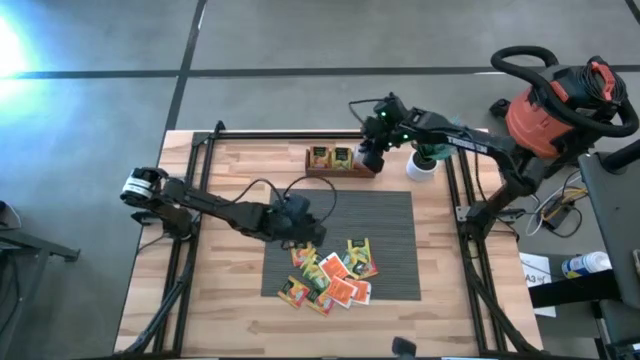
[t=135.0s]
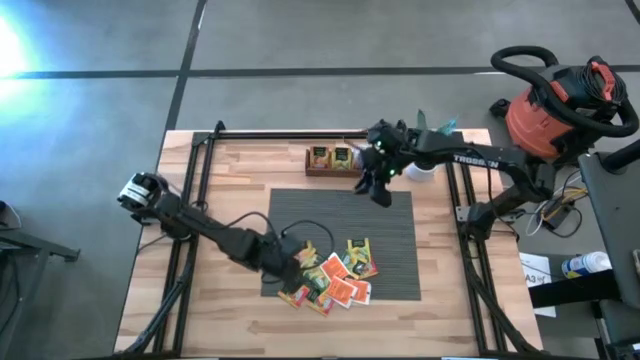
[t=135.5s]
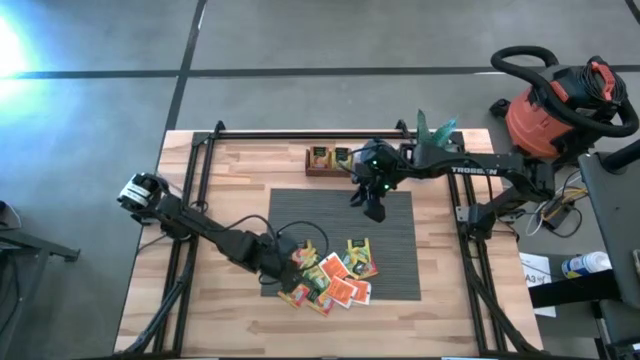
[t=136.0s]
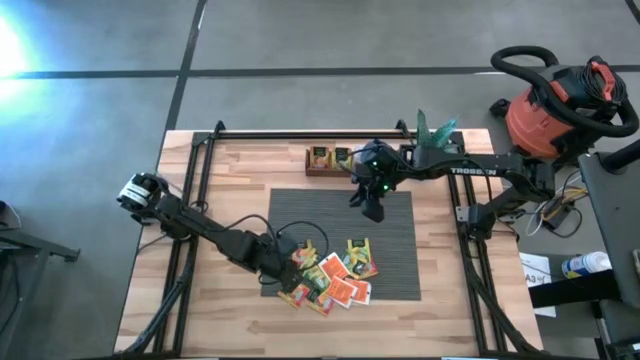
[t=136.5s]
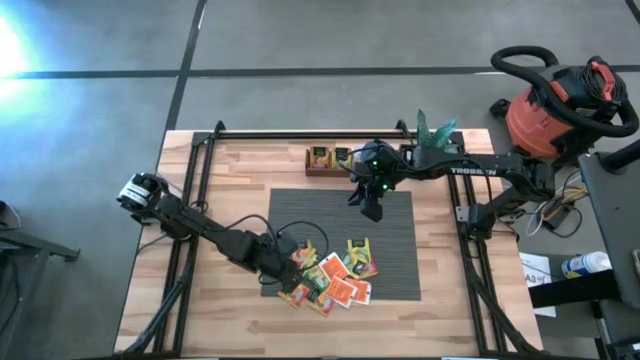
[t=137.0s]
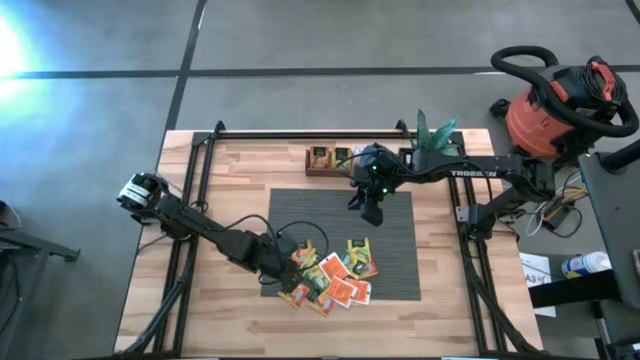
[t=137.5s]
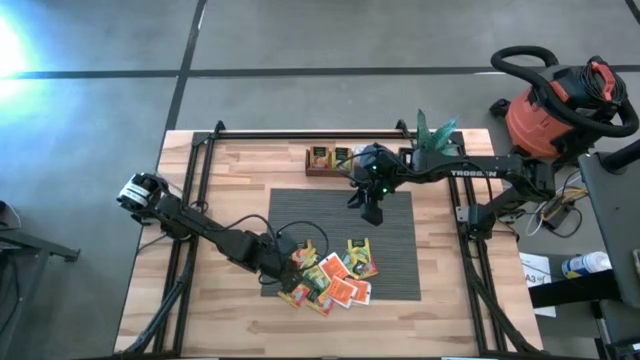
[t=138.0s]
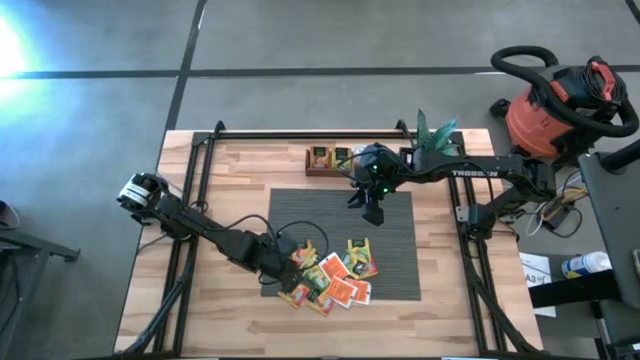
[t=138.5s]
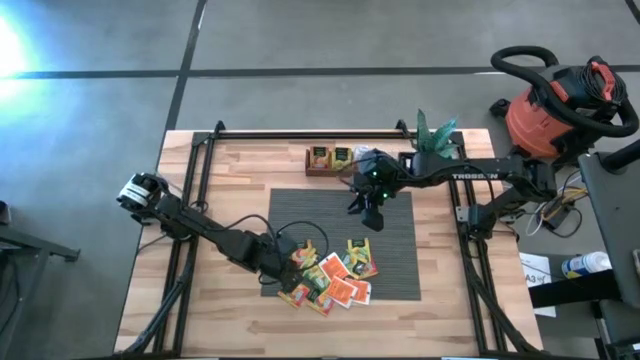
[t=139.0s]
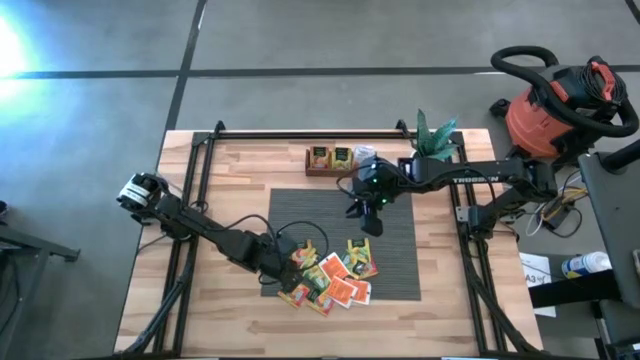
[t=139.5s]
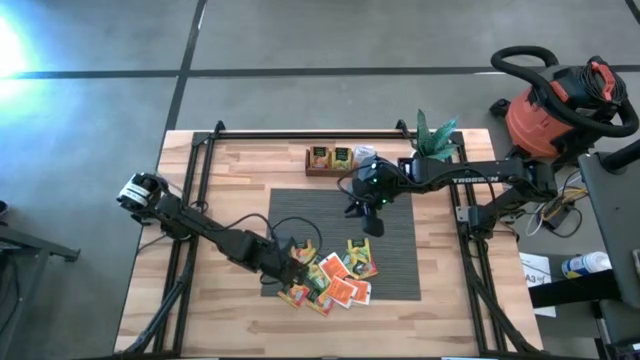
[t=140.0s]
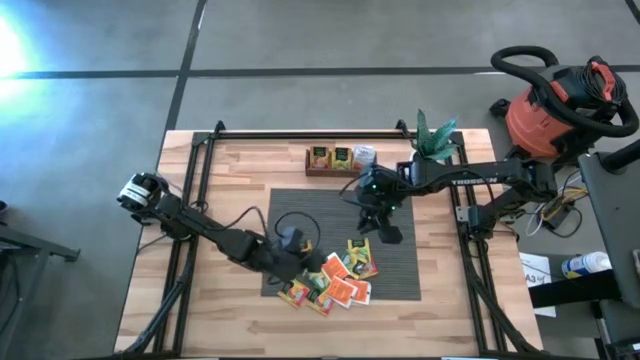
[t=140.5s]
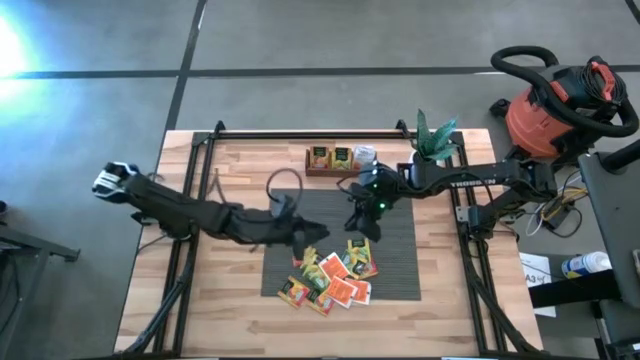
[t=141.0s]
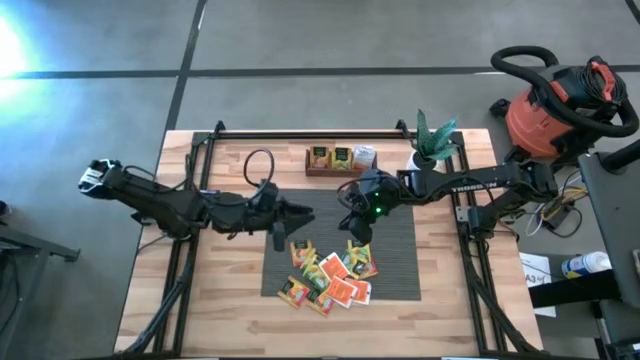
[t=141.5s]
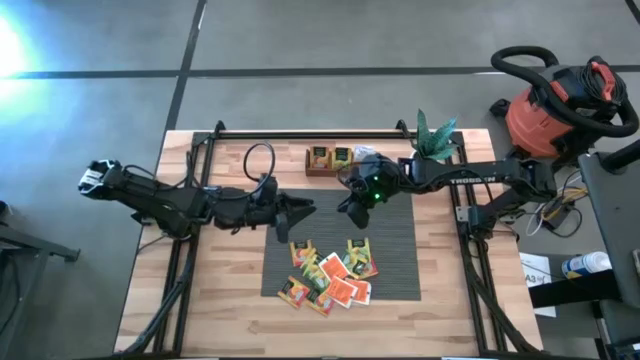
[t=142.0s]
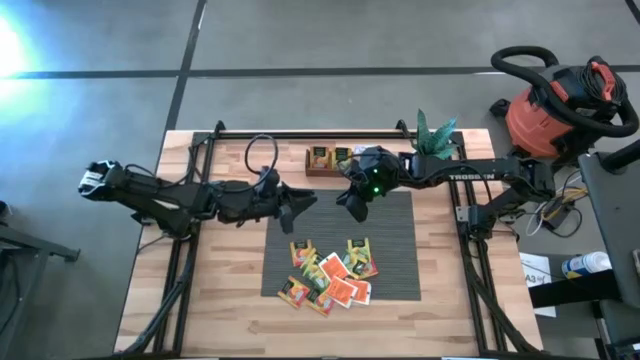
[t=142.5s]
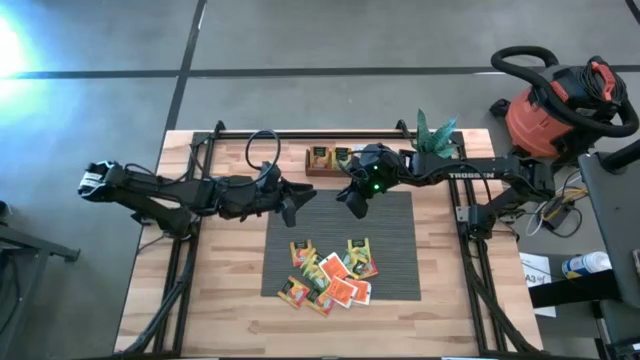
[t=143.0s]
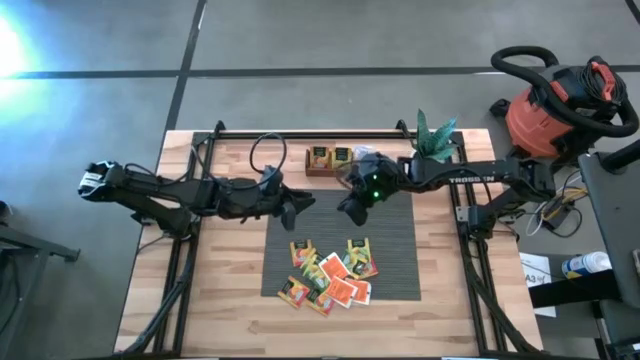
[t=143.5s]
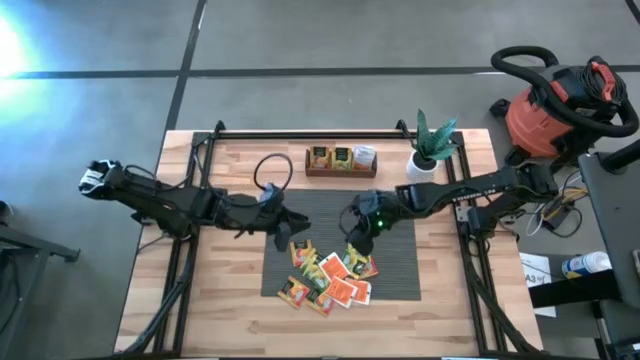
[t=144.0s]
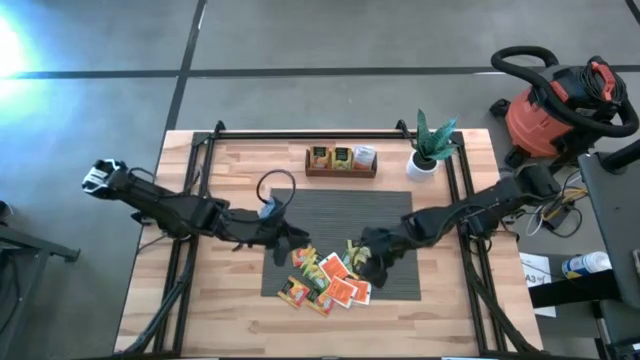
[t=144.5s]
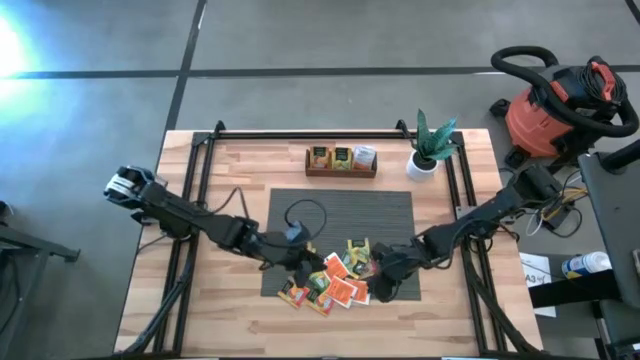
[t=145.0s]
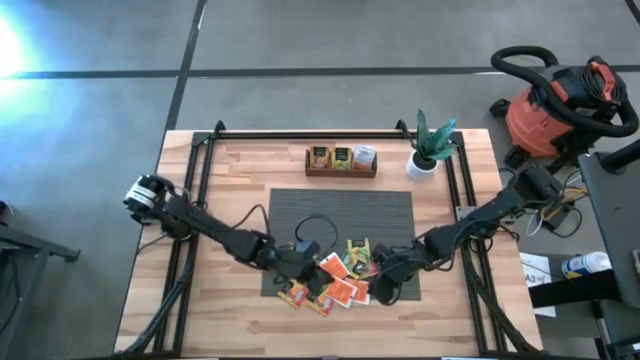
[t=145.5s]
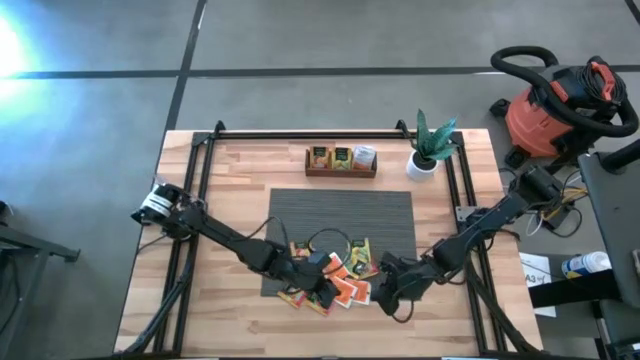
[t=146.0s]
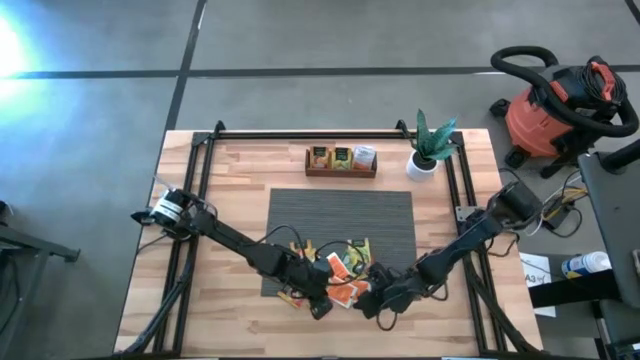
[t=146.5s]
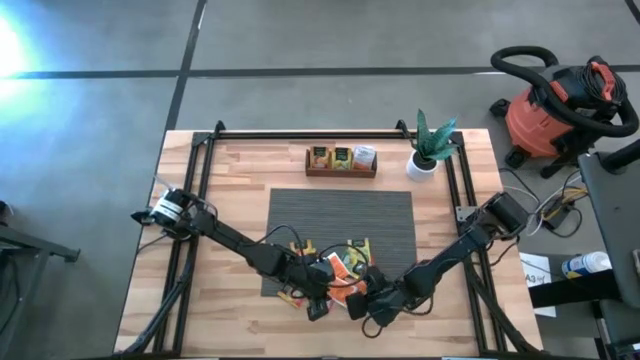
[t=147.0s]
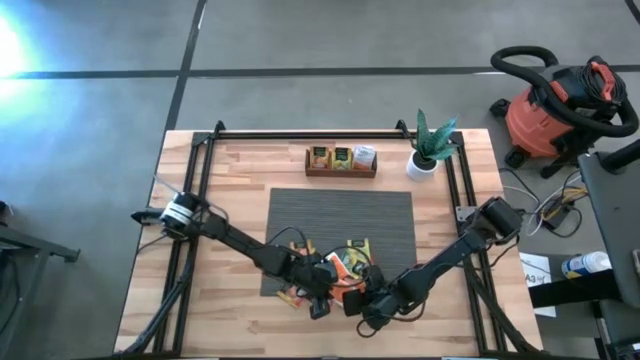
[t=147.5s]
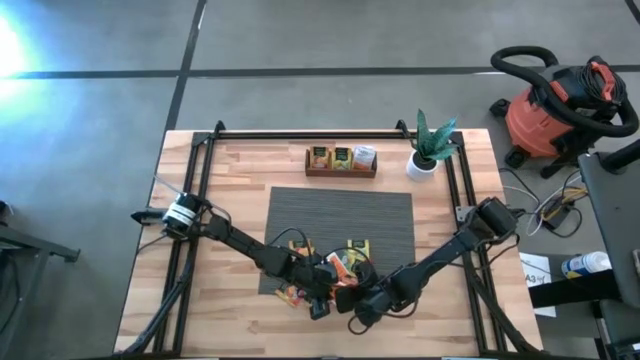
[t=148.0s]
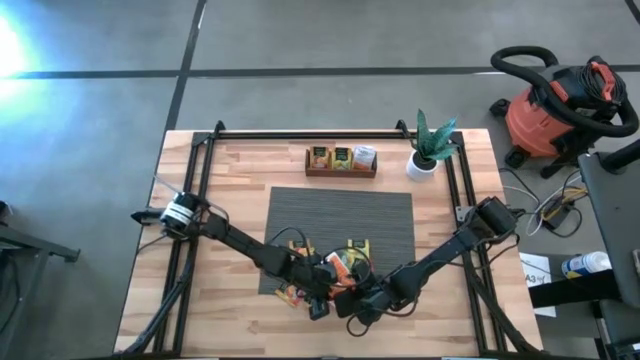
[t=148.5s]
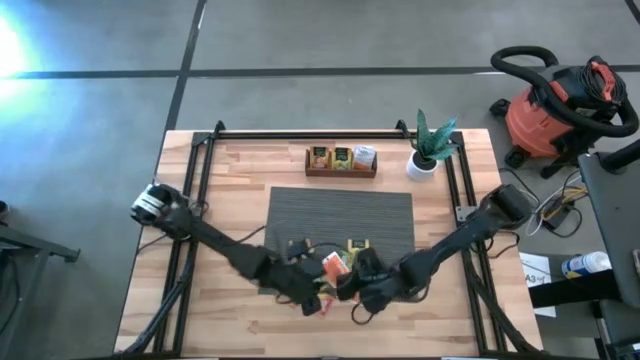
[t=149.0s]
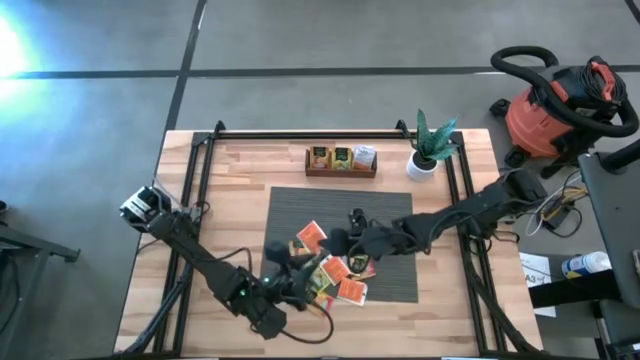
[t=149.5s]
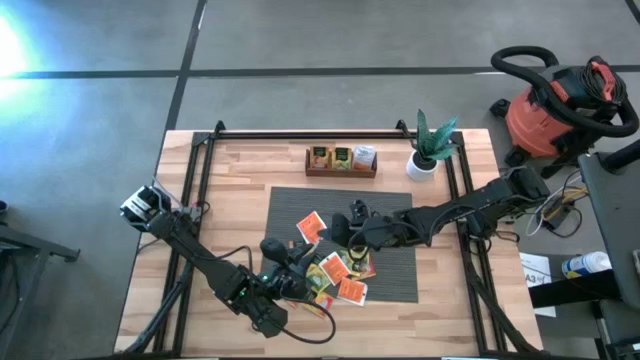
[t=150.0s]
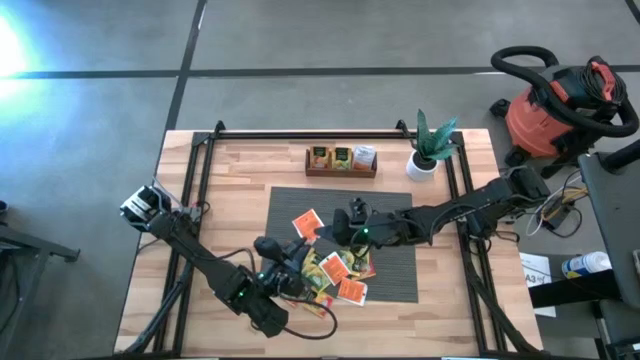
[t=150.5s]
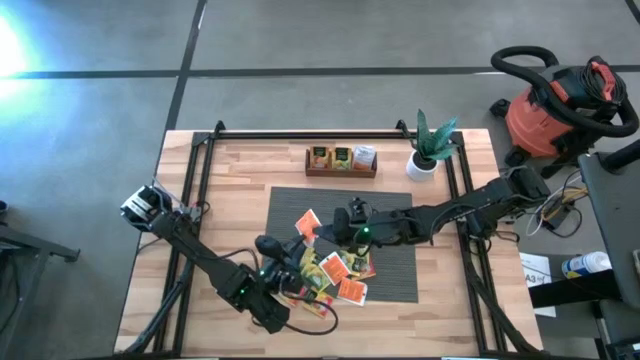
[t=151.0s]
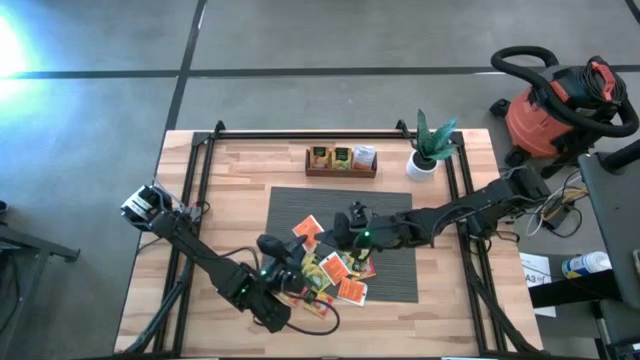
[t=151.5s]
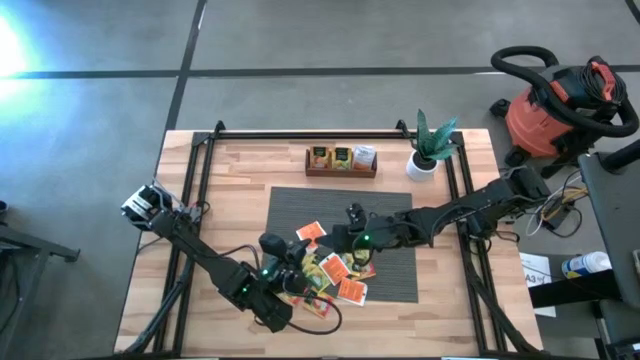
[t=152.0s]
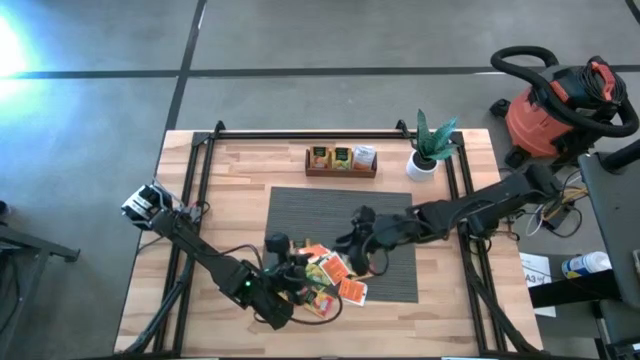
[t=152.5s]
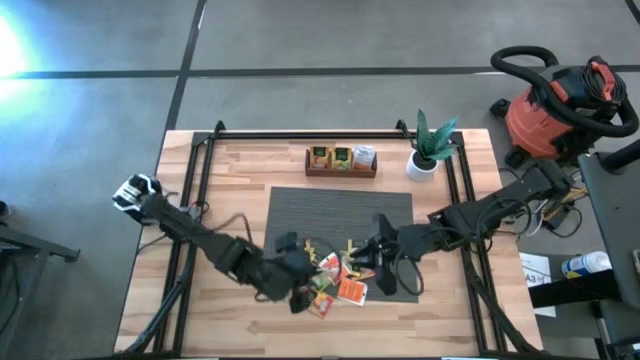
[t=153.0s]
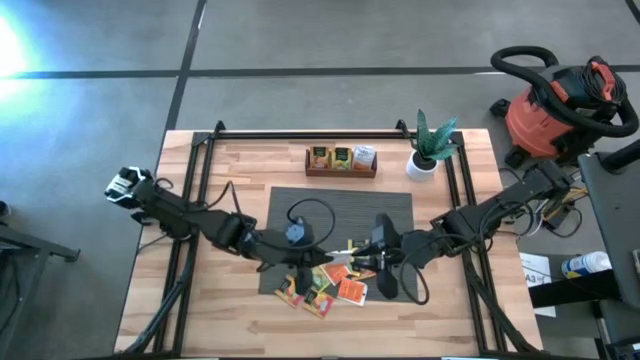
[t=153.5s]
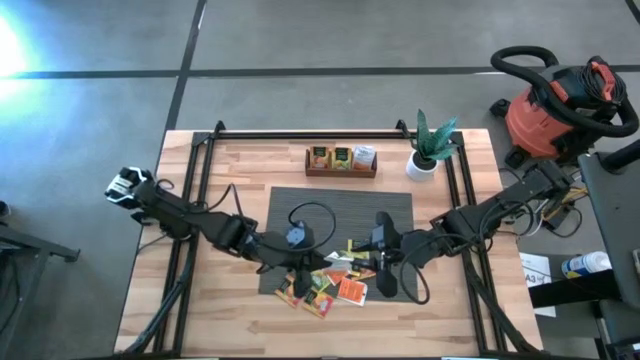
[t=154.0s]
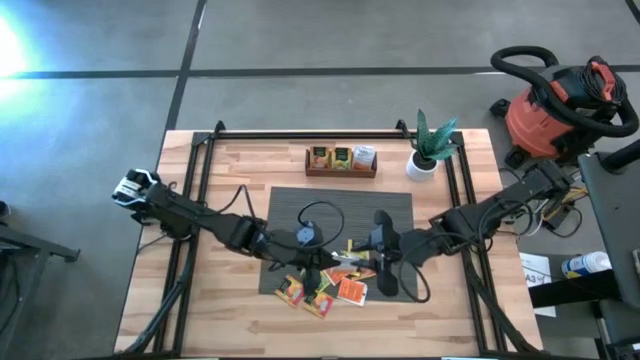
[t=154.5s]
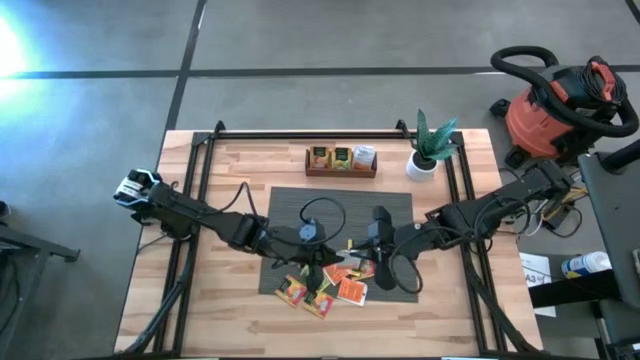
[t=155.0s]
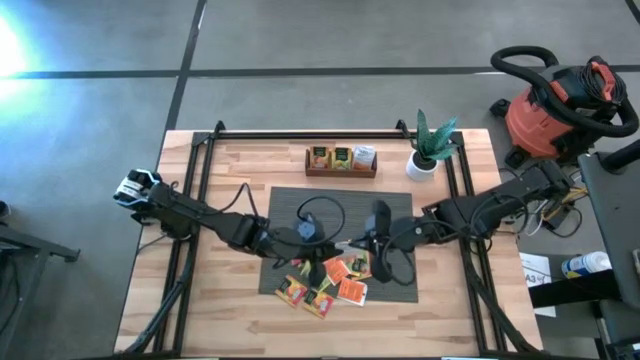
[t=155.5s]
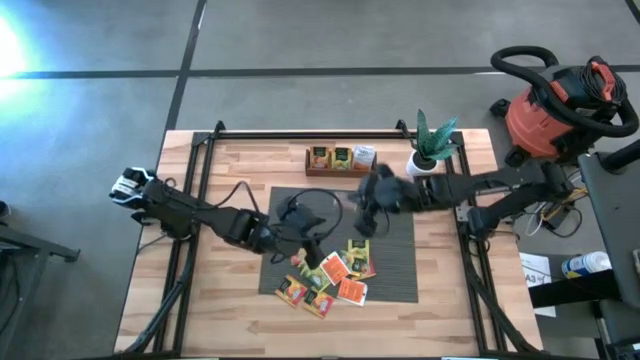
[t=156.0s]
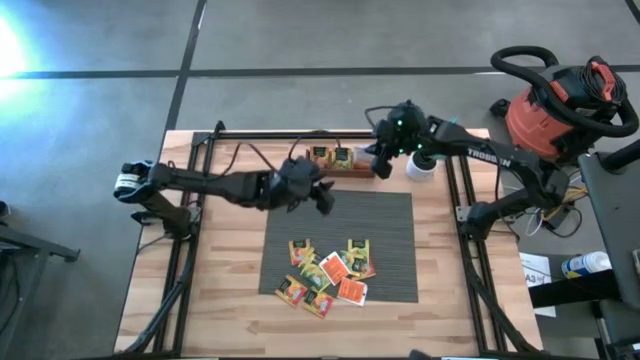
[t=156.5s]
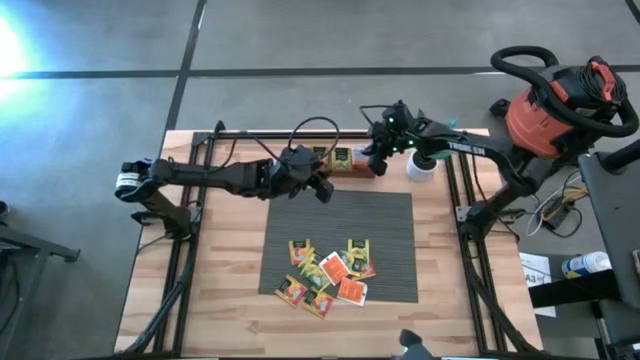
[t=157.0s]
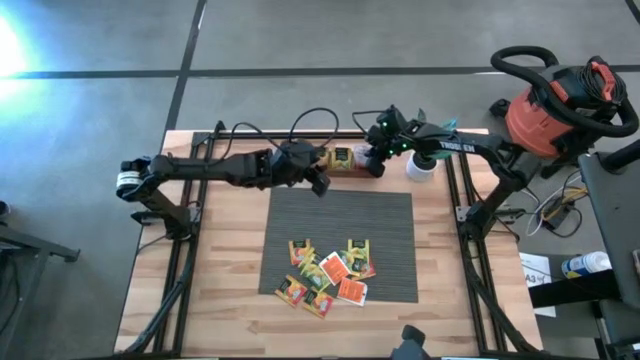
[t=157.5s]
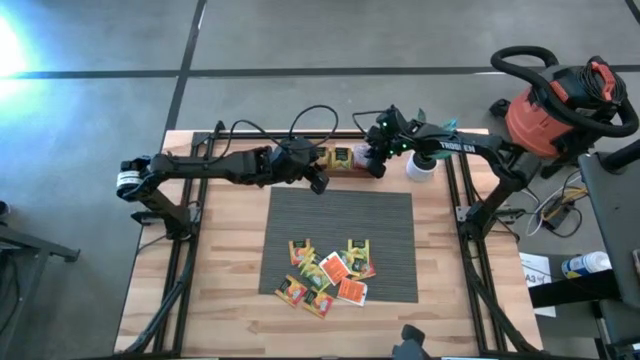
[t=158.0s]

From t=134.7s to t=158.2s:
Task: Pick & Place Tea
Put the white orange tea bag into the right section of the wooden organizer
